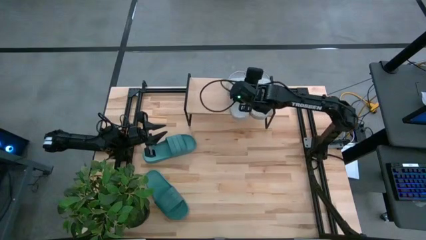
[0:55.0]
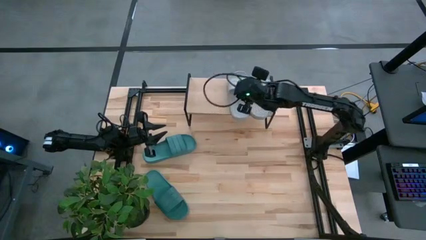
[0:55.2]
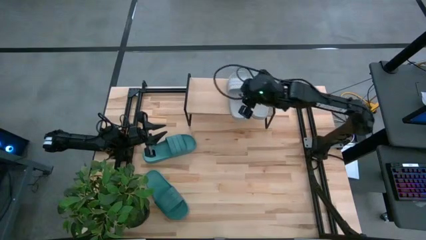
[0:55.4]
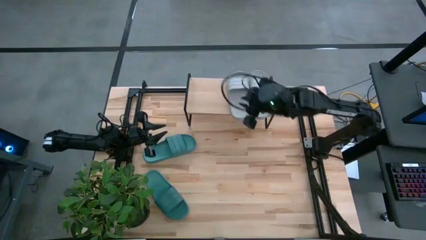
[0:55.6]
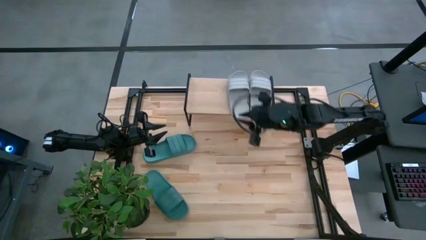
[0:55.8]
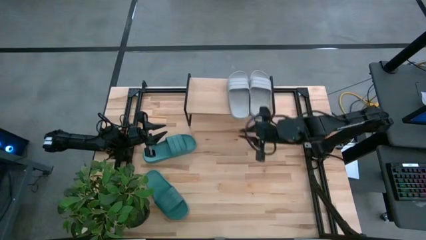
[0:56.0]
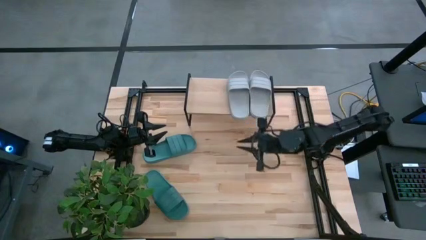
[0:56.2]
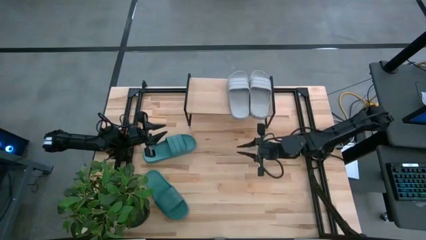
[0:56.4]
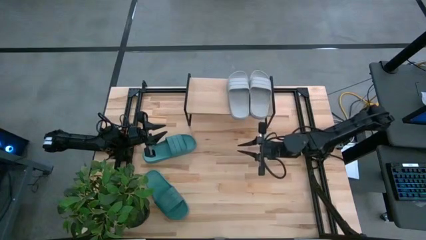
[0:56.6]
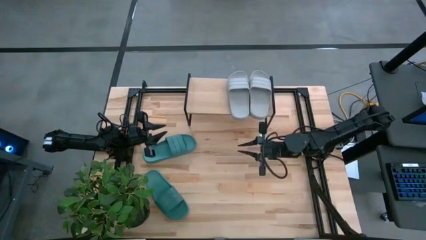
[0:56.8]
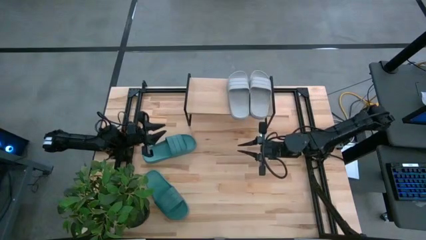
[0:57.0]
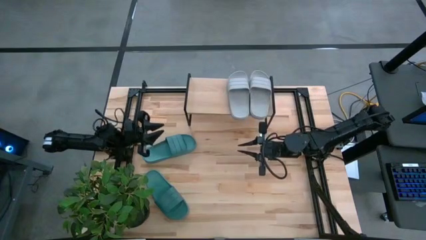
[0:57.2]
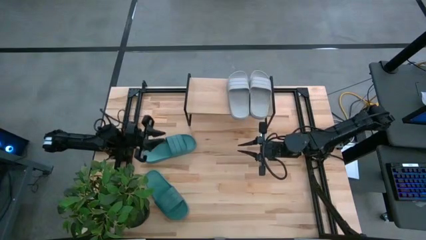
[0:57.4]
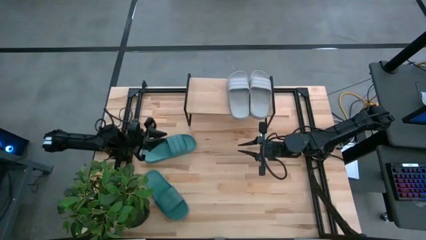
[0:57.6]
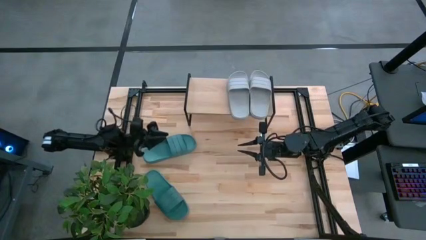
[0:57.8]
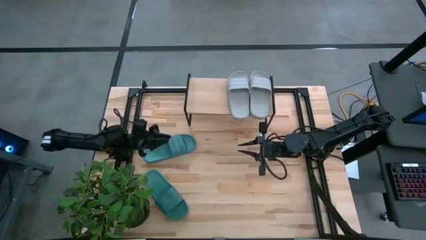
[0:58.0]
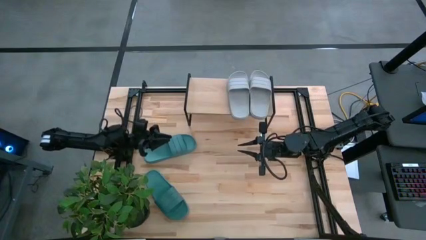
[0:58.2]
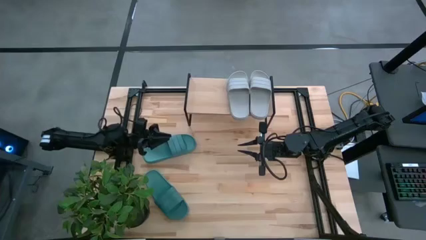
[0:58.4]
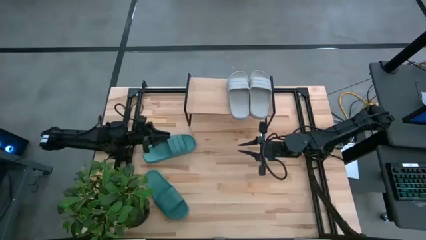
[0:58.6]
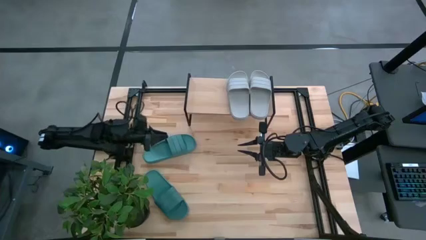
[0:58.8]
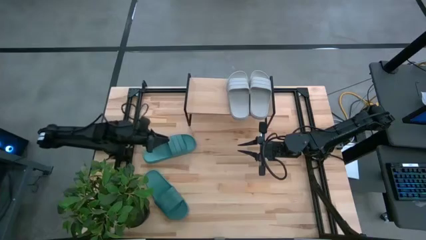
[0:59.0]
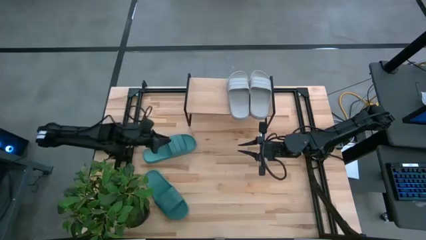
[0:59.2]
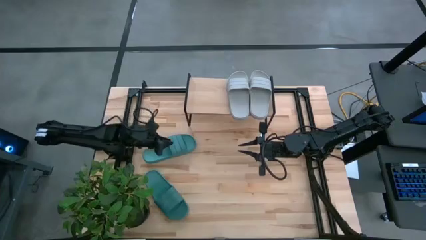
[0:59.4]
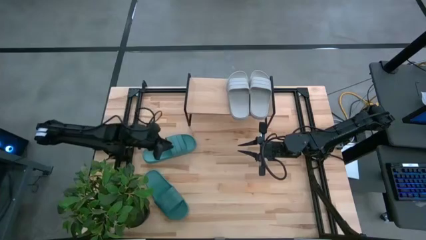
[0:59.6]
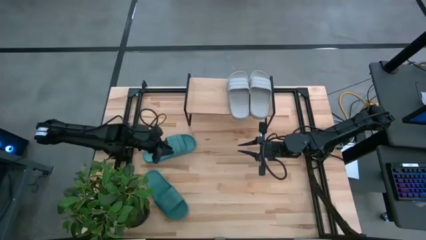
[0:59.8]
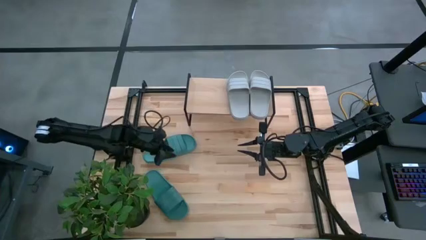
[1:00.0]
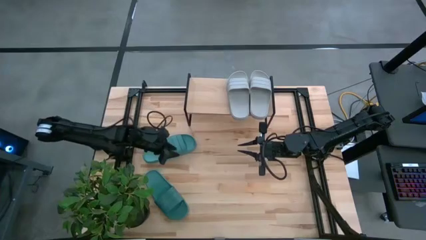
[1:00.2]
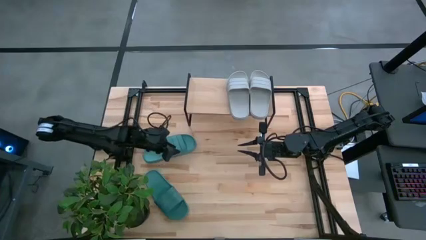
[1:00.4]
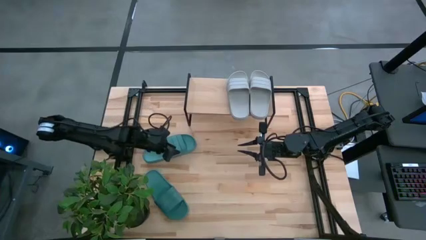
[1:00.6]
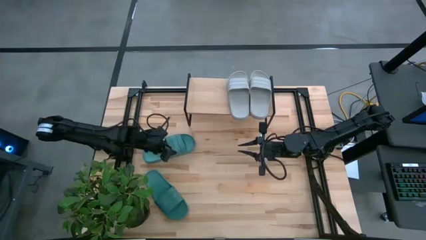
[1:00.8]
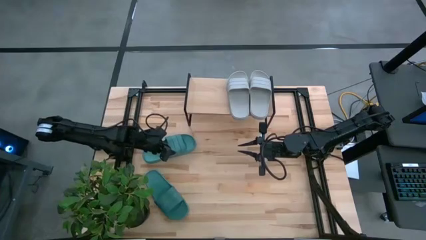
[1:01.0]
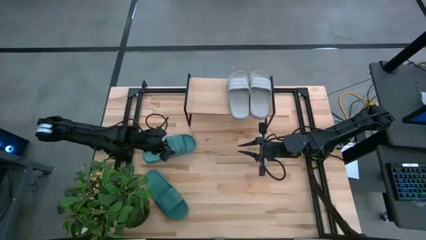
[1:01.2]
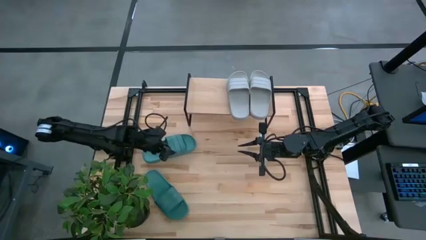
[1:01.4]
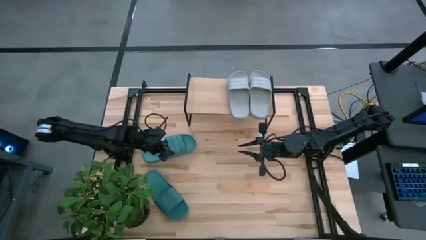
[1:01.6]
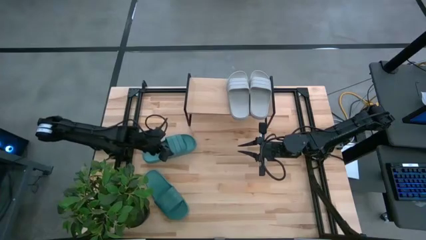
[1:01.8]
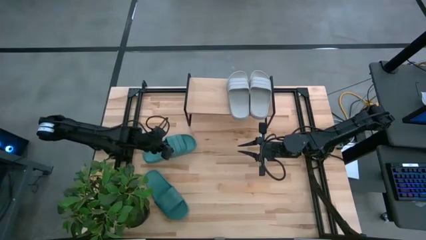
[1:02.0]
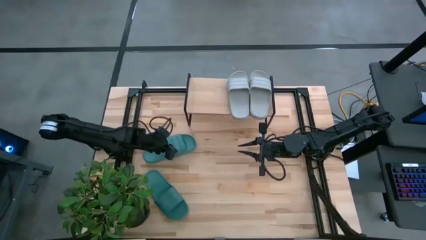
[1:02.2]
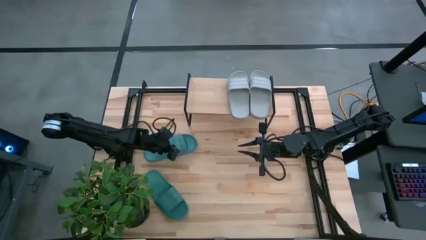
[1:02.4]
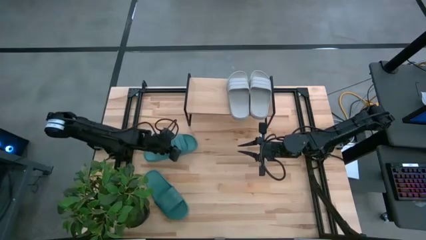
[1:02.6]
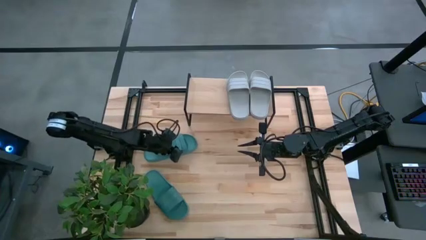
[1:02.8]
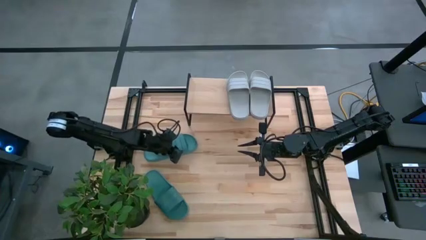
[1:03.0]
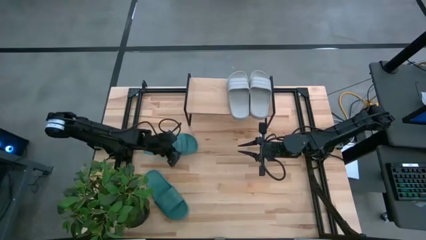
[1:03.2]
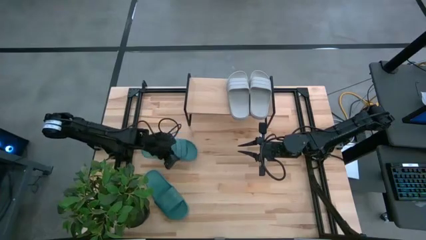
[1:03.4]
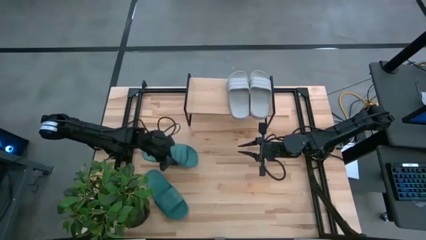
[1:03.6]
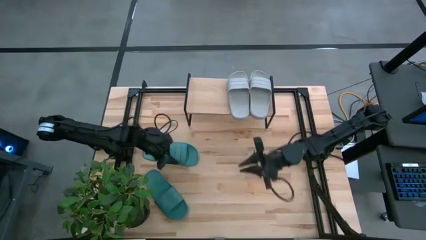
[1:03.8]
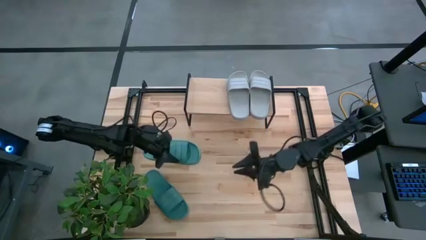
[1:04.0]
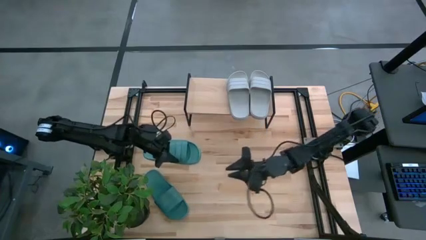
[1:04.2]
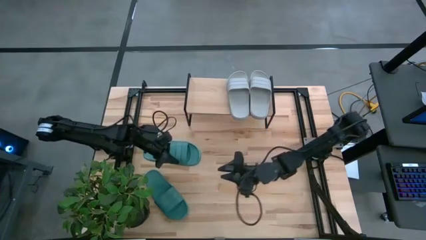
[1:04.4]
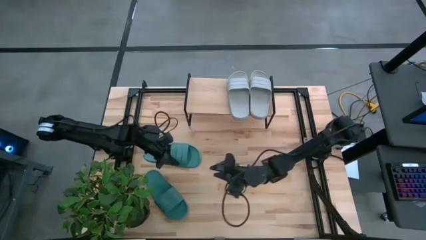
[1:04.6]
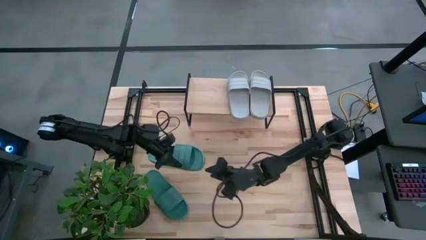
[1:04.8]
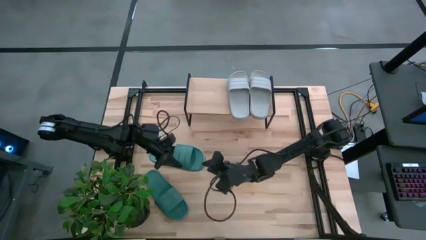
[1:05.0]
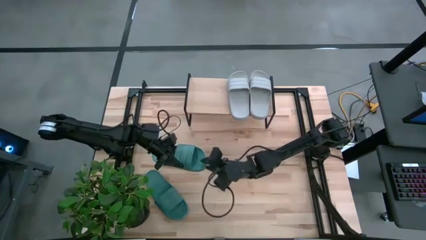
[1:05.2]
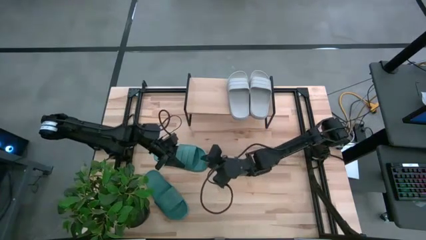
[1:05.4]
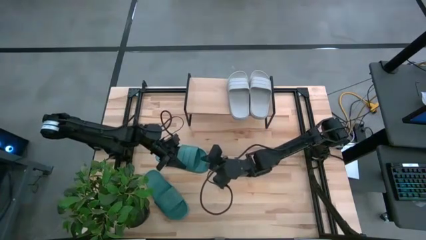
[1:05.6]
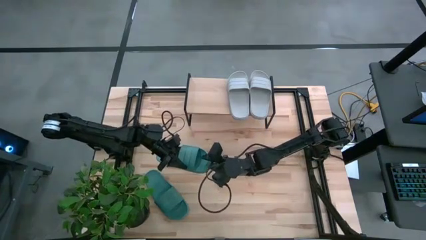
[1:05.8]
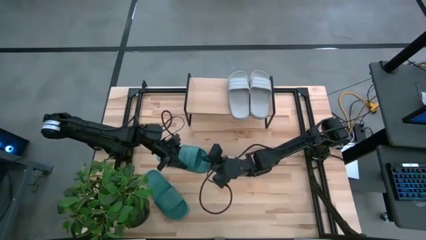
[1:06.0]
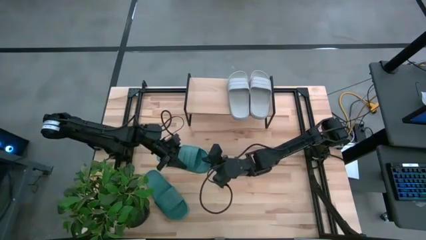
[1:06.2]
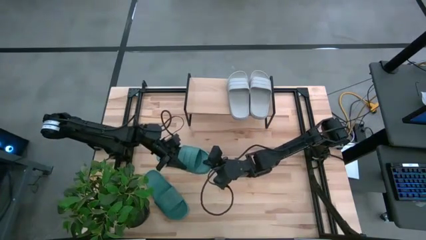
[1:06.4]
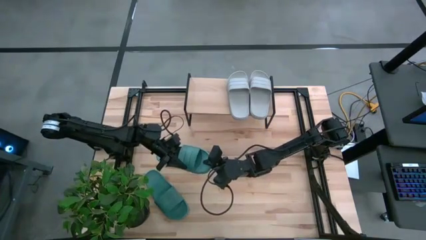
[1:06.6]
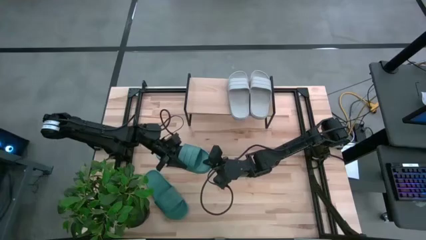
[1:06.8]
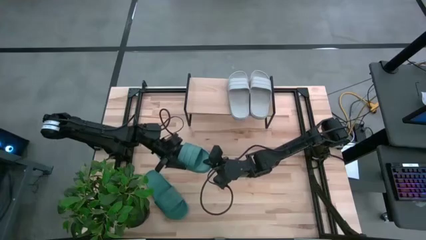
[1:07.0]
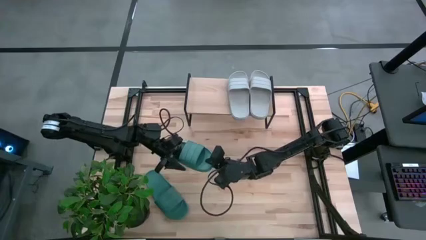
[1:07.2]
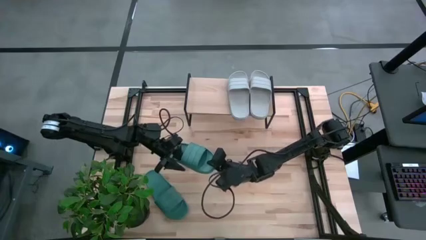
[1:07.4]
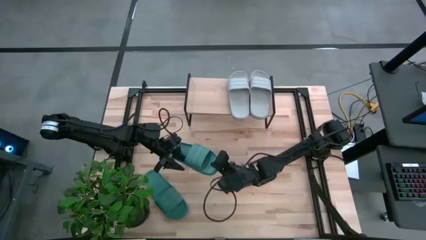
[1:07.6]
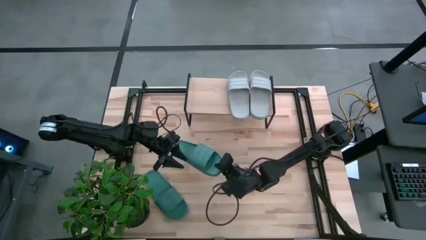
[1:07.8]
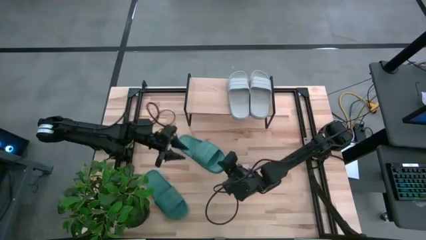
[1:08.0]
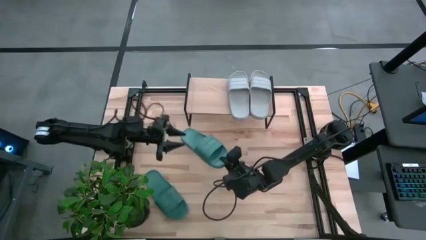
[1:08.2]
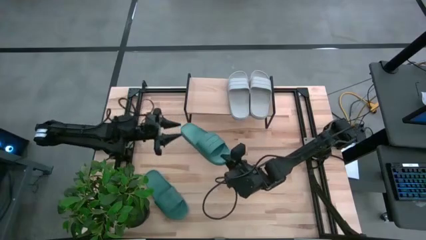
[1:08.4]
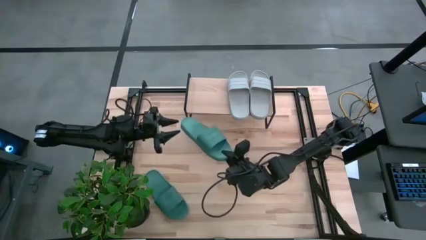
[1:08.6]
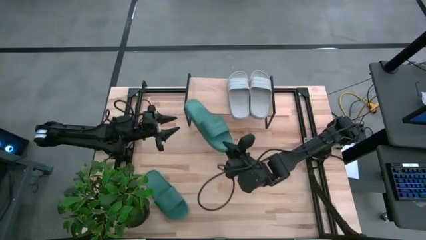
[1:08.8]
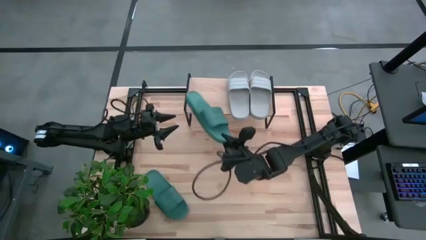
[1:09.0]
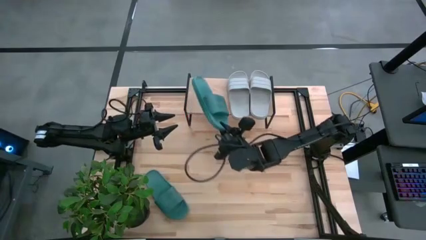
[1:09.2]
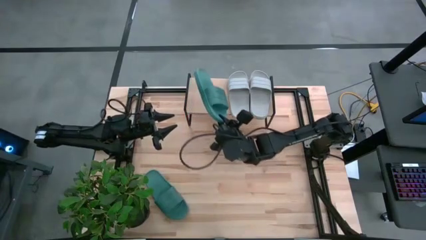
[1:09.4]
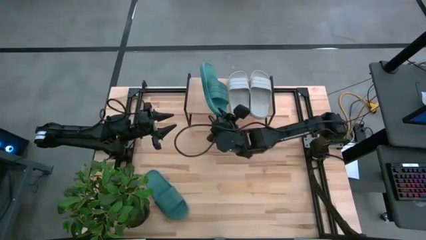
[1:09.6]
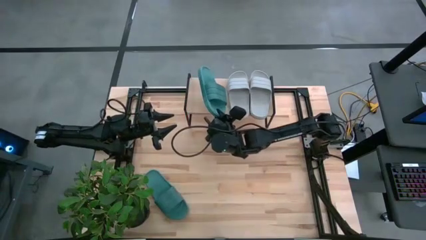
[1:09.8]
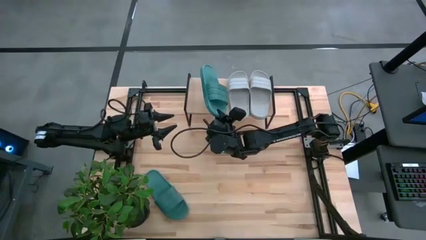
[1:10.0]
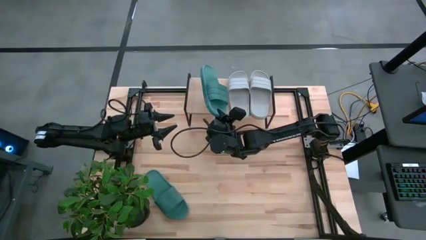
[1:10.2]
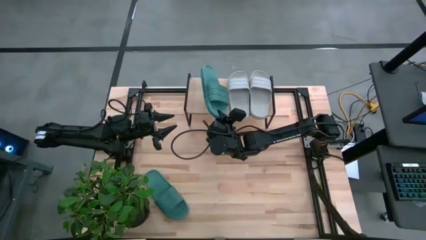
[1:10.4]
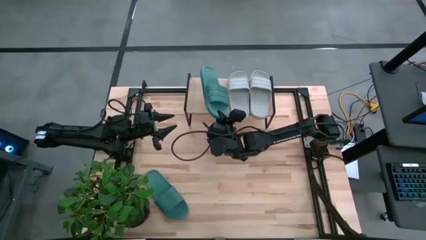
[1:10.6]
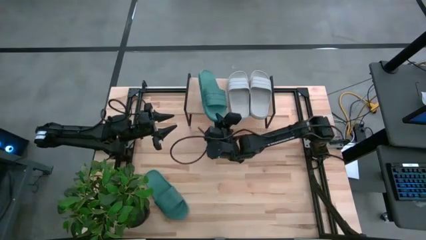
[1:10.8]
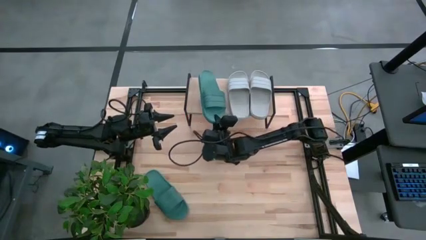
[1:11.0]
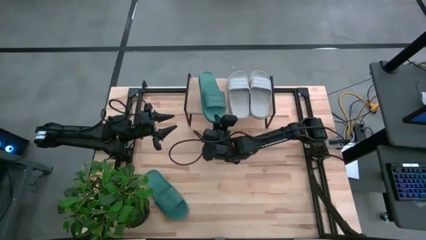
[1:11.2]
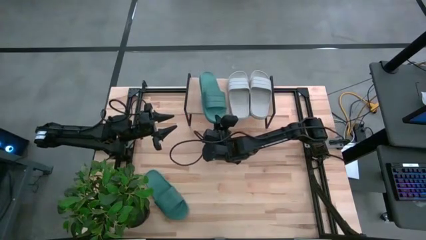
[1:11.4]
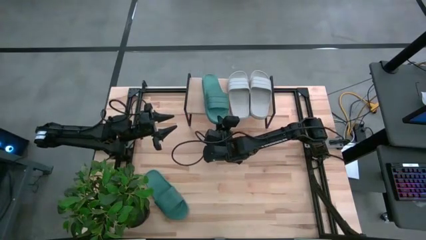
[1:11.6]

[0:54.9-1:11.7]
Task: Pick and place slides into the shelf
Put the top green slipper on the shelf
